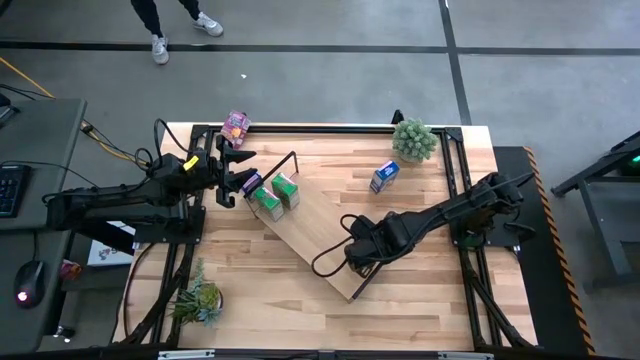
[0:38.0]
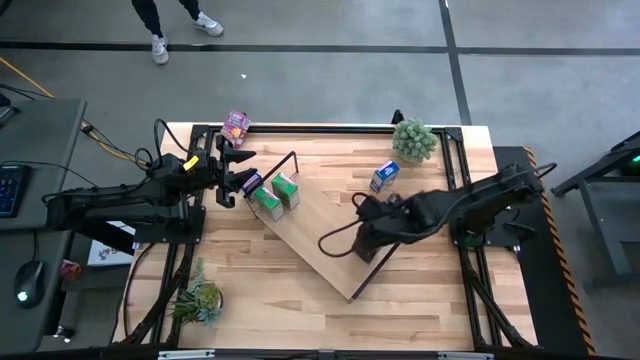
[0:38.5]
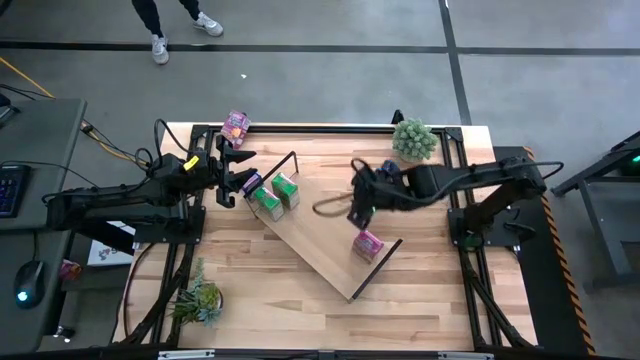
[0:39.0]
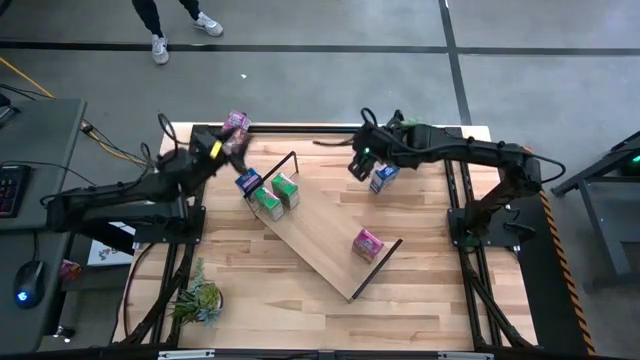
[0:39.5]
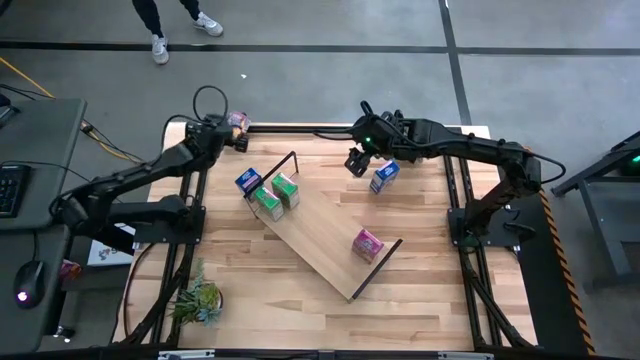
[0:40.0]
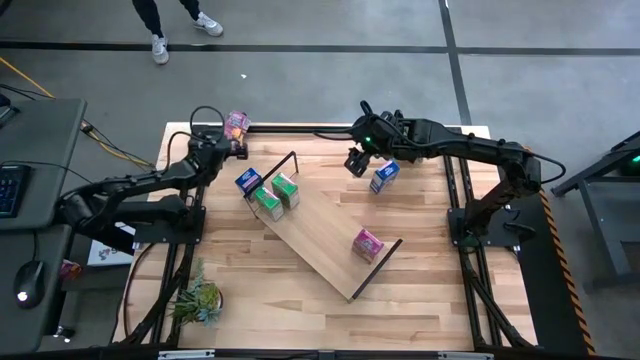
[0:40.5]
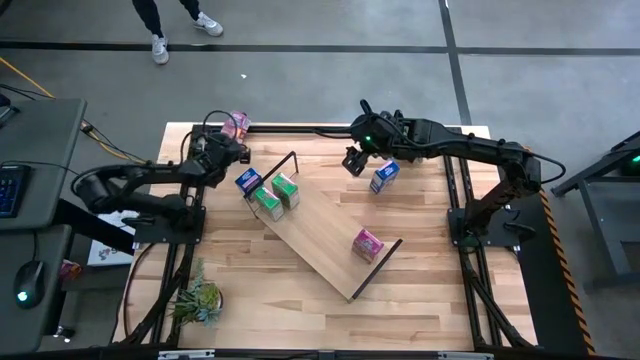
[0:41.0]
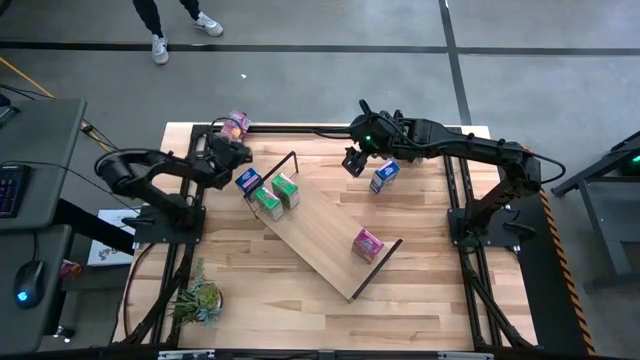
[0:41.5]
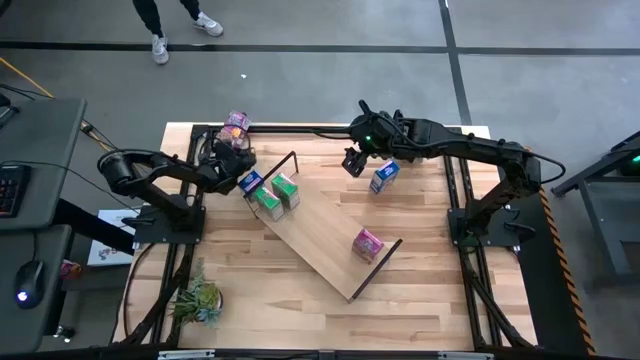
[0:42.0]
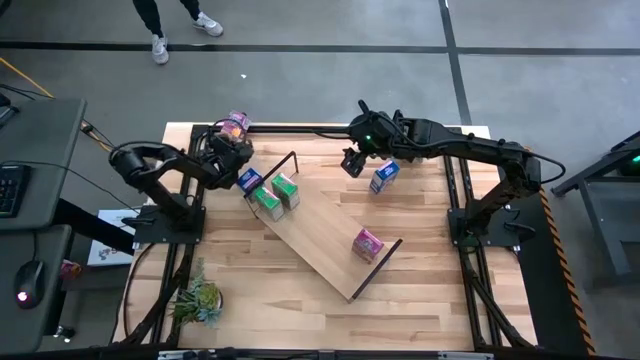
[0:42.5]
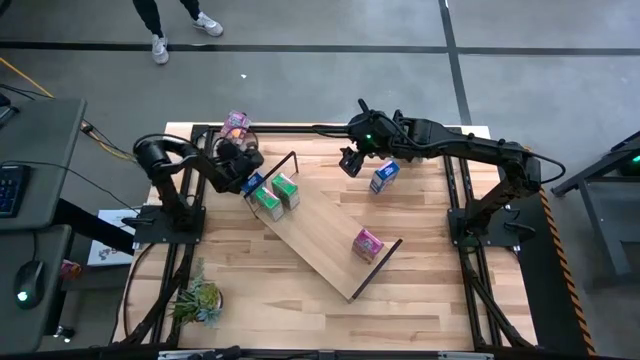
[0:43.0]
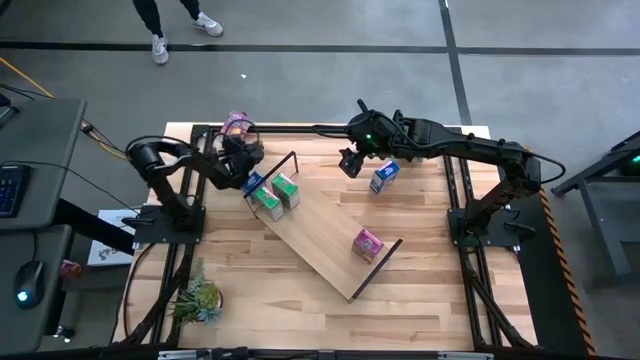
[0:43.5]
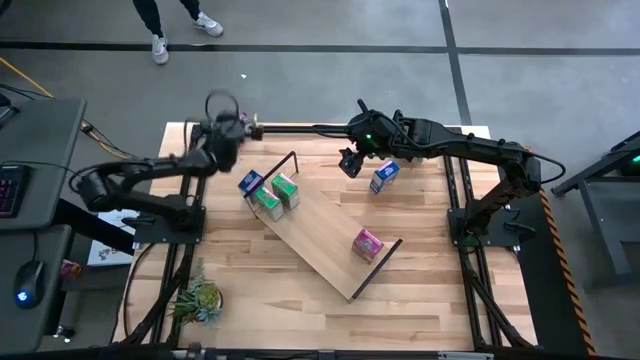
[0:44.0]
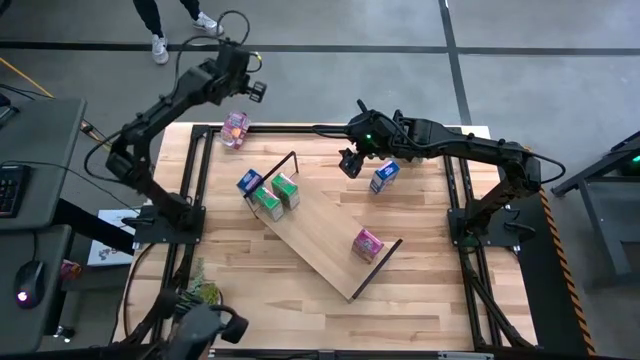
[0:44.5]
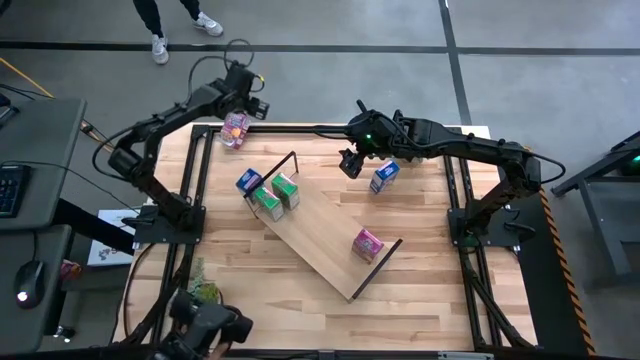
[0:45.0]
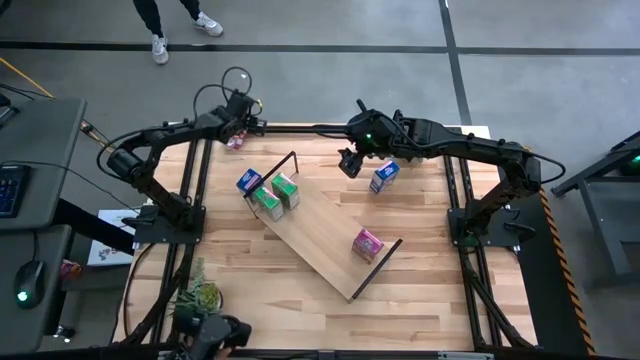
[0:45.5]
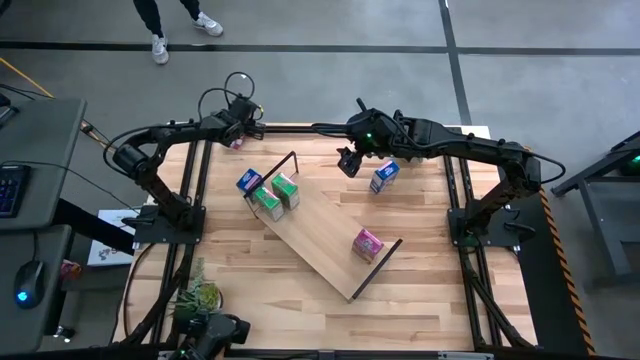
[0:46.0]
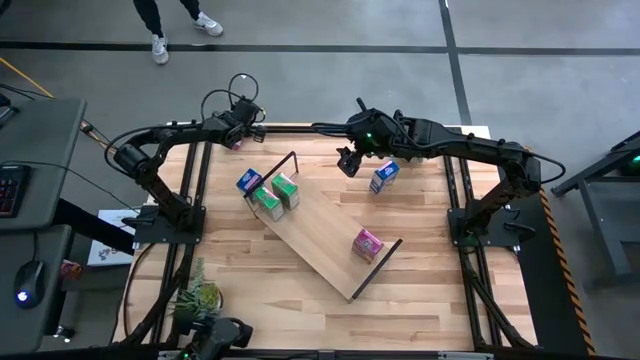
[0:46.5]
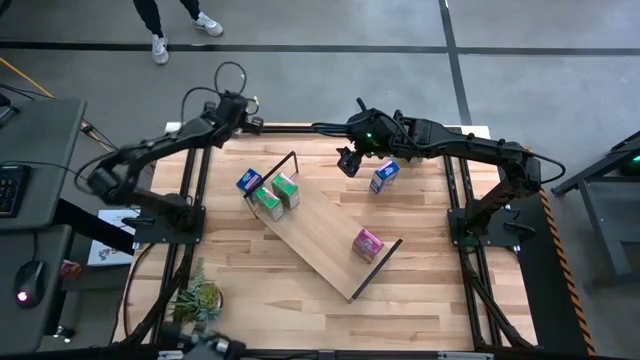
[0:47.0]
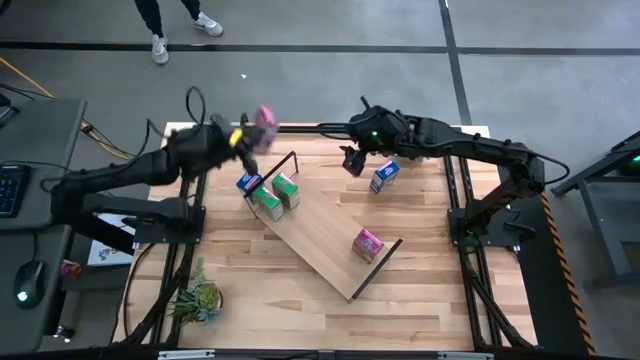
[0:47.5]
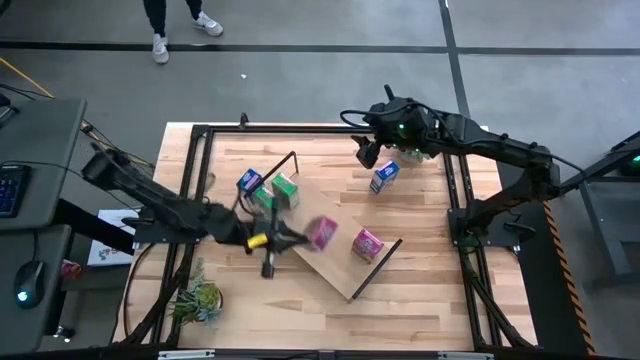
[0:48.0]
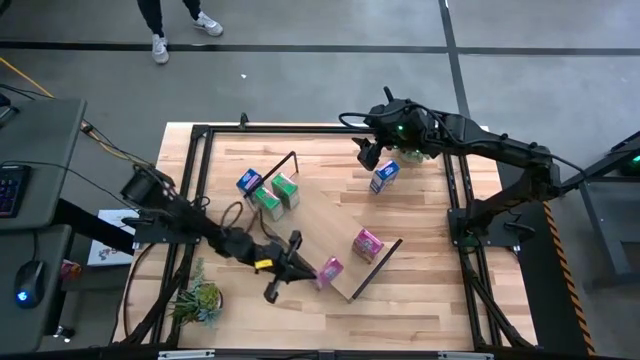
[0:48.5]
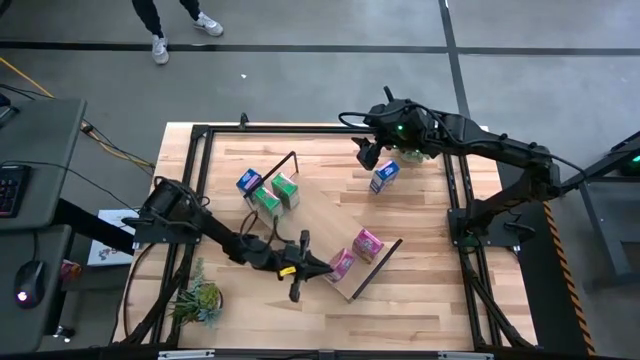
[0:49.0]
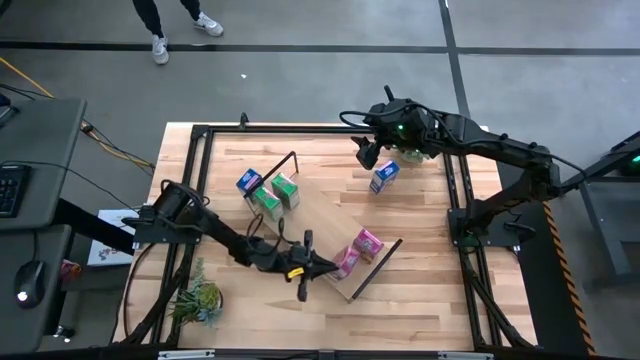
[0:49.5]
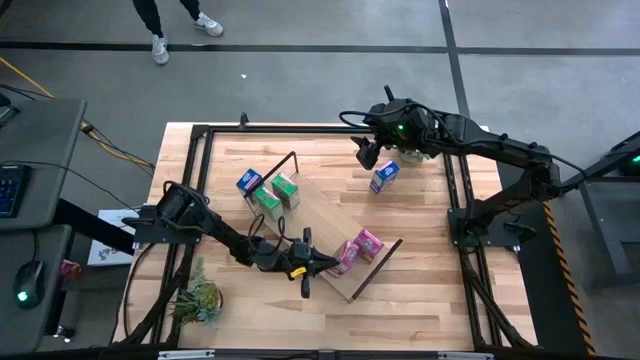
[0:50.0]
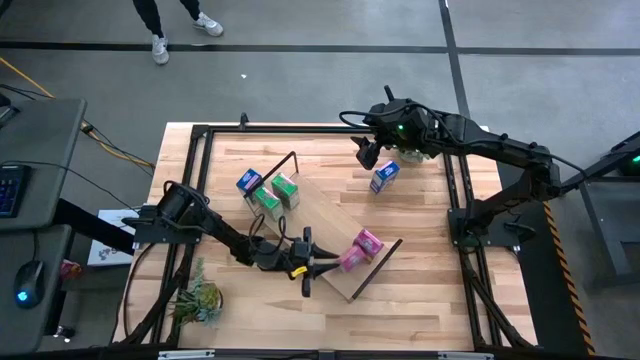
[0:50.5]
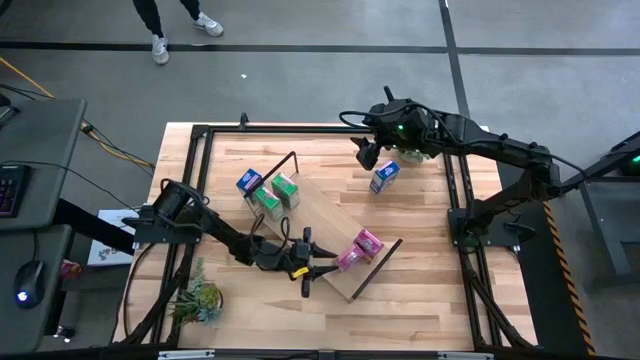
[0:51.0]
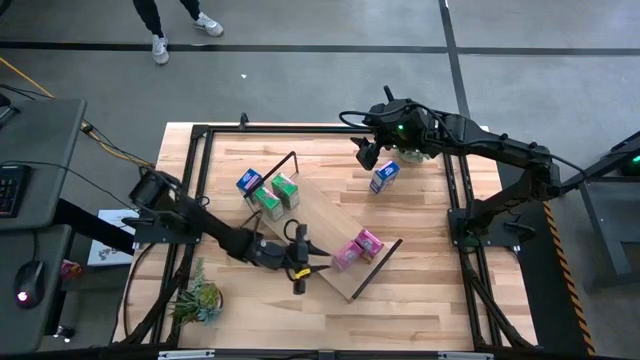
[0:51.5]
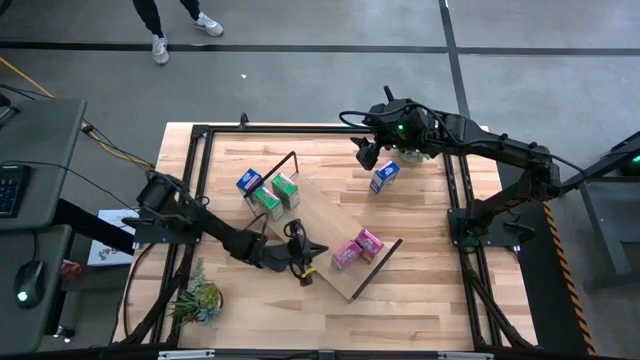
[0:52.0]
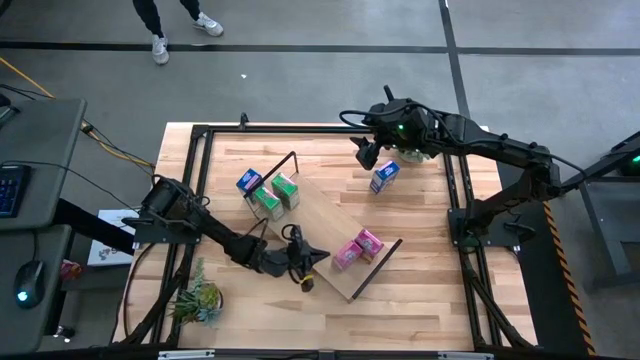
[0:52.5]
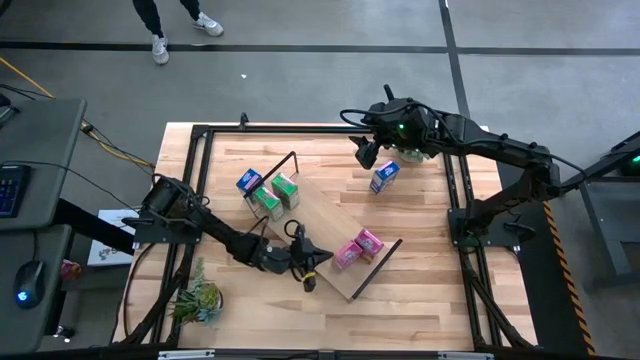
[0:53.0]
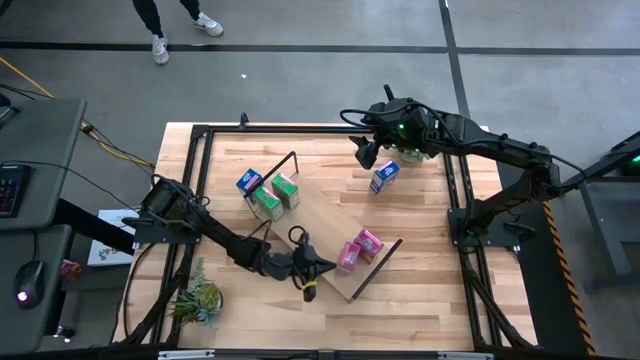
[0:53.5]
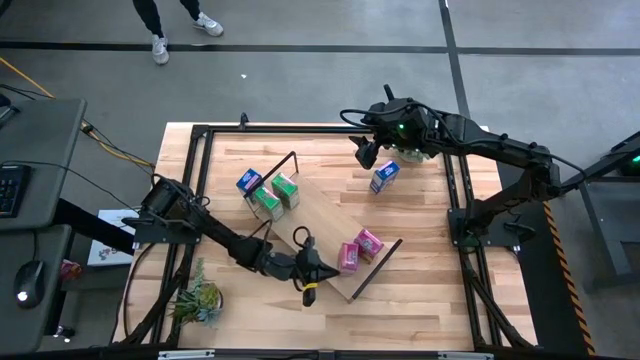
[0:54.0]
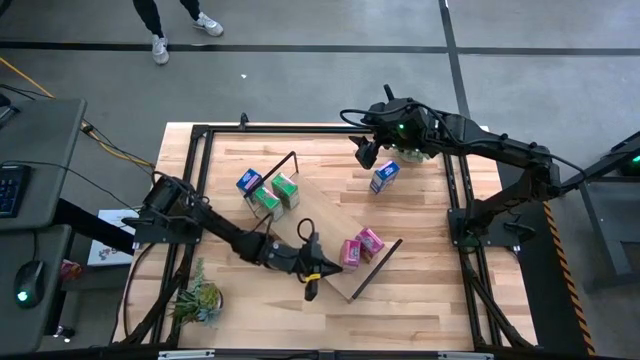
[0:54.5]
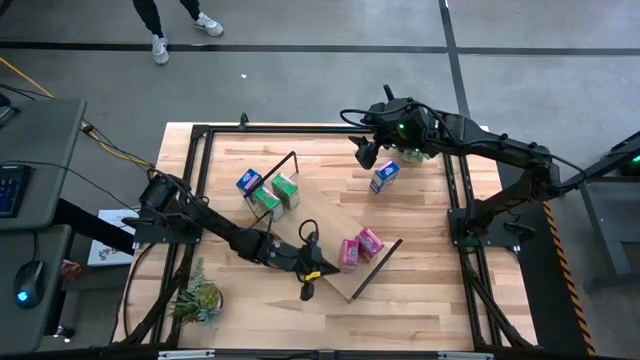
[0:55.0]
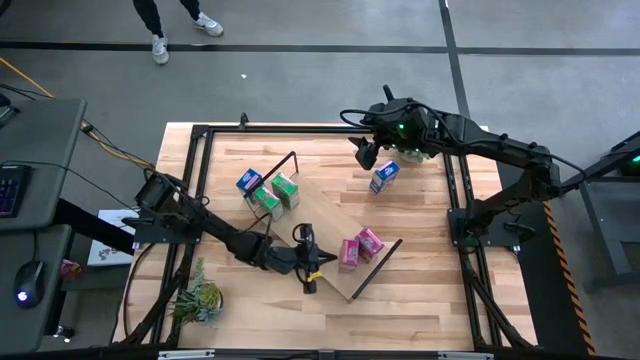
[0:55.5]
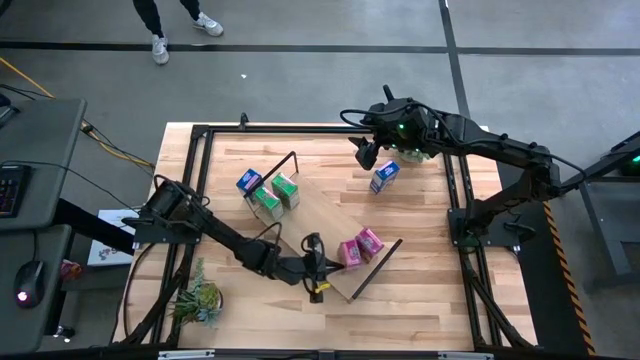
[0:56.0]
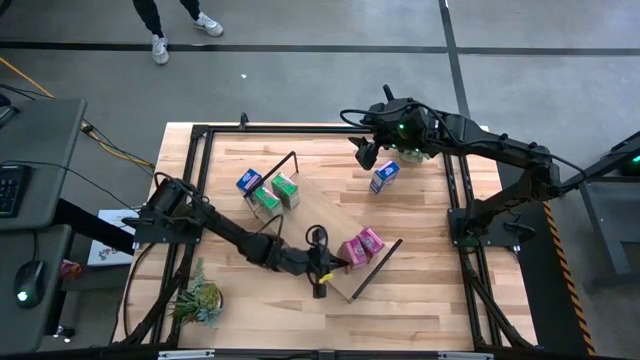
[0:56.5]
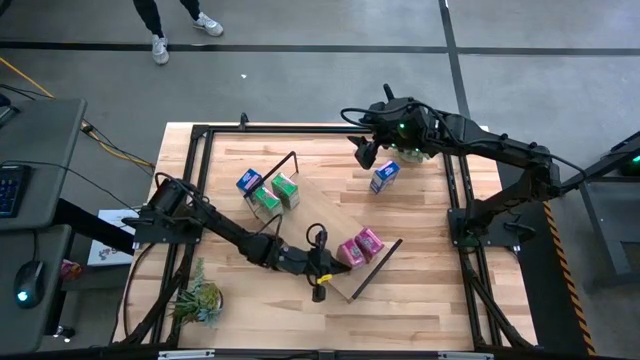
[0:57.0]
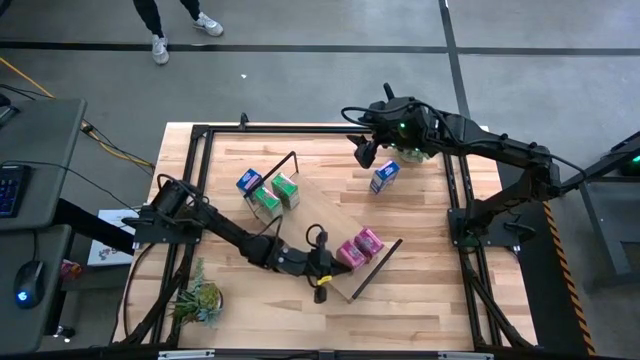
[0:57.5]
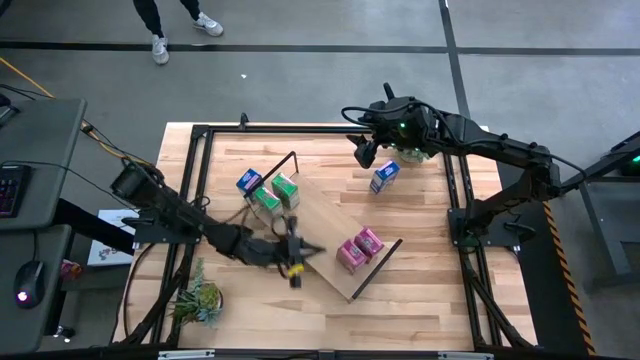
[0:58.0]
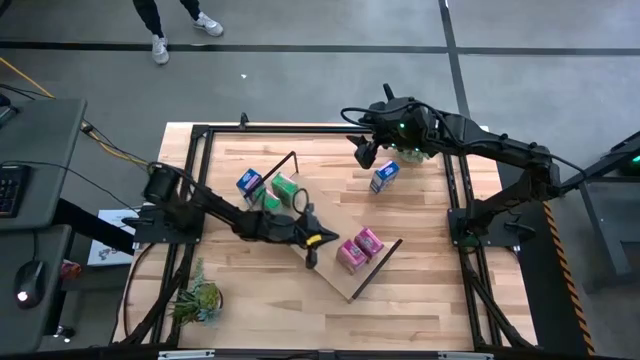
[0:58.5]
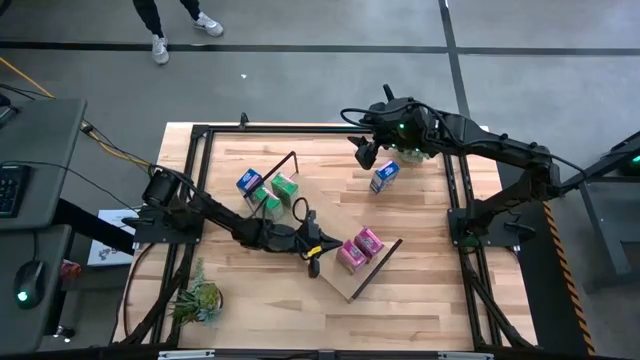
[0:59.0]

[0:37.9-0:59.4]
Task: Stack cereal on shelf
Put the pink cereal box on the shelf
